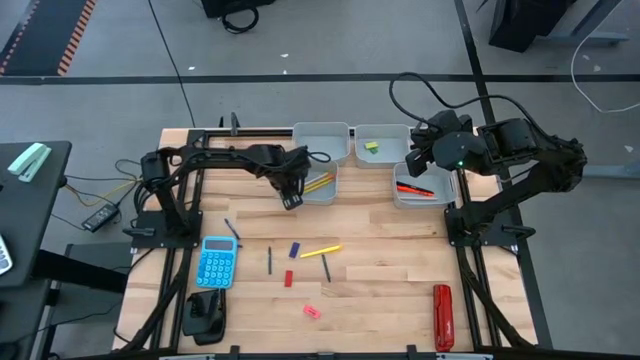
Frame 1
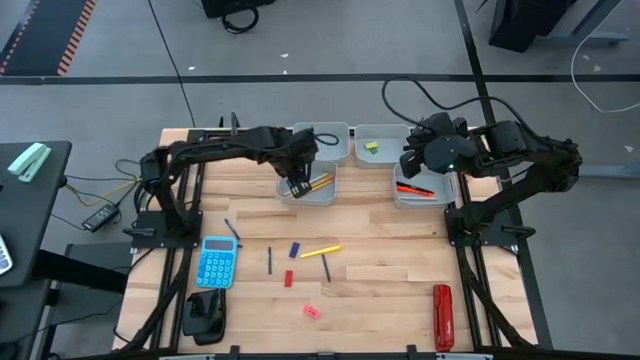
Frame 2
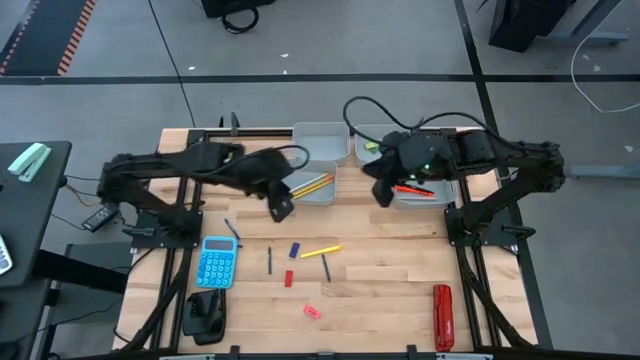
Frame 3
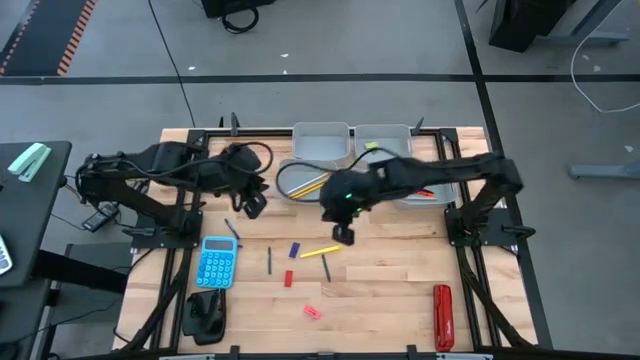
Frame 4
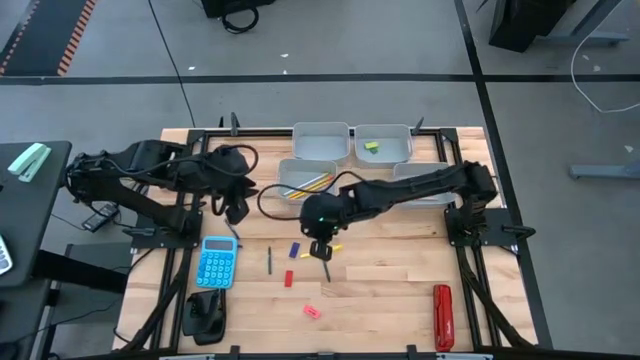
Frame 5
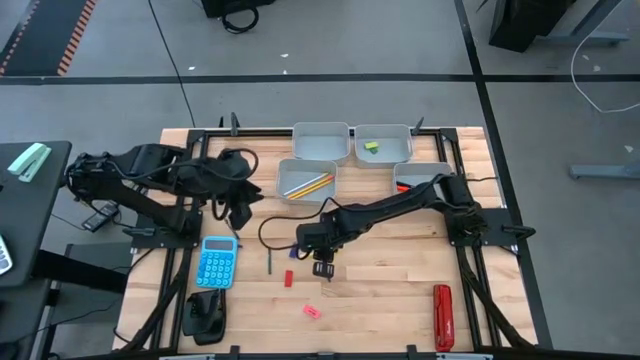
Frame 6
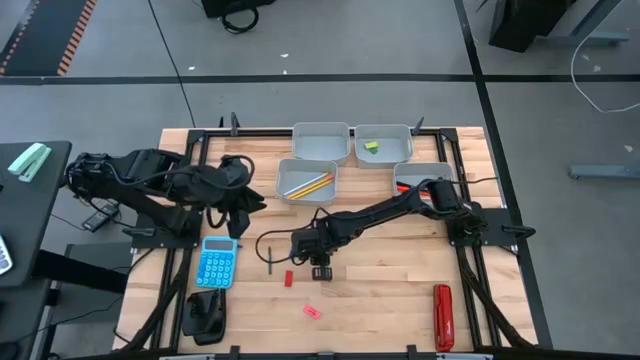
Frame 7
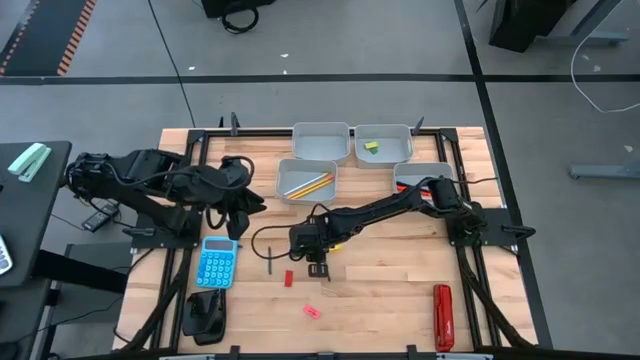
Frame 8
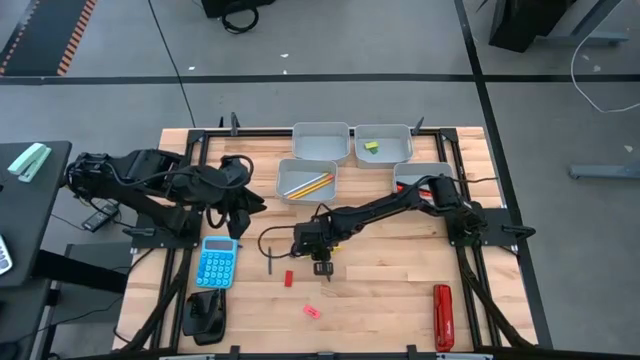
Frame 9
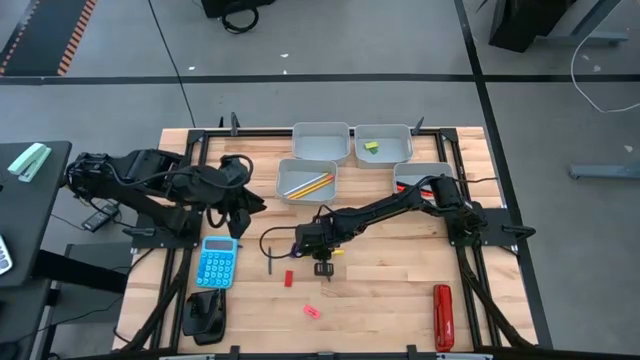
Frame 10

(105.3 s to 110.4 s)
Task: Sort crayons/erasers/pens/pencils in bins
Put the yellow pen into the bottom right gray bin

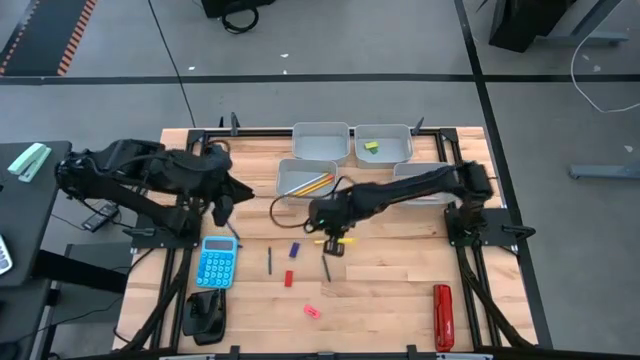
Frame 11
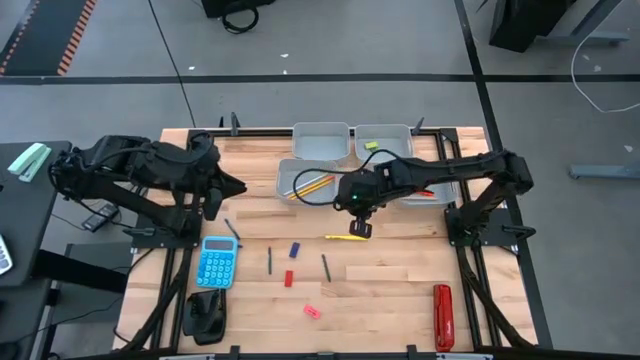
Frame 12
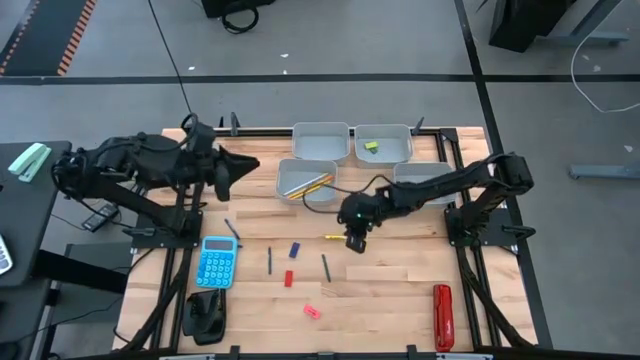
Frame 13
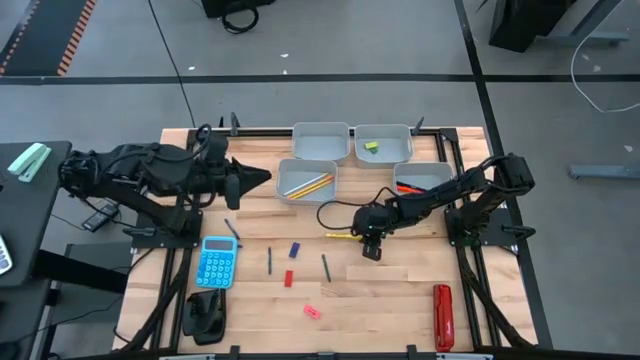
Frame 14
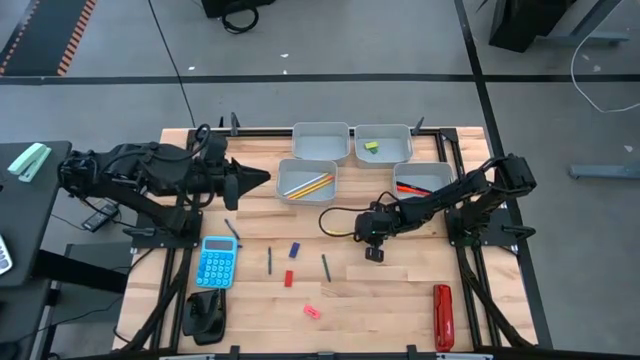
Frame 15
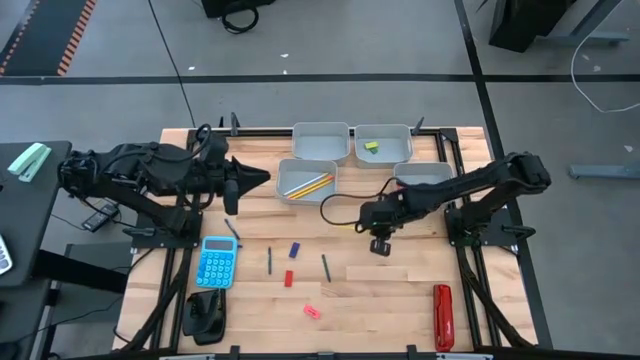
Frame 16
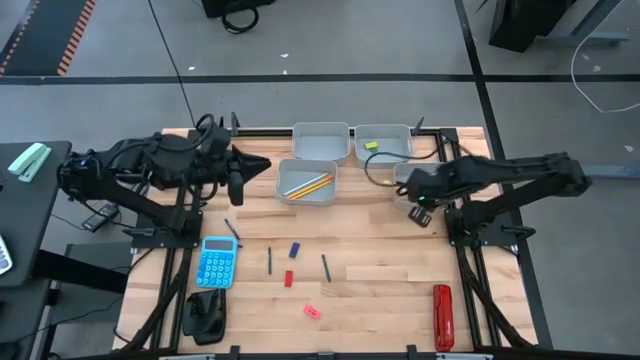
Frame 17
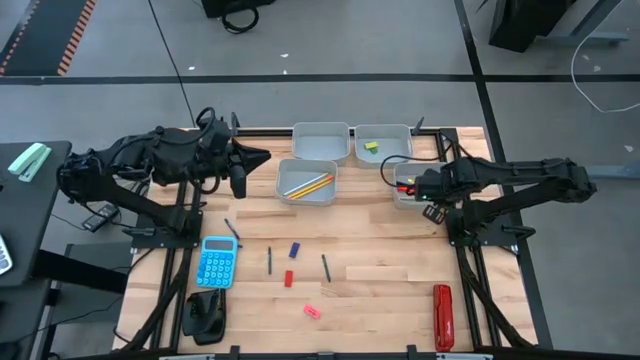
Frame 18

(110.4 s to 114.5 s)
Put the yellow pen into the bottom right gray bin

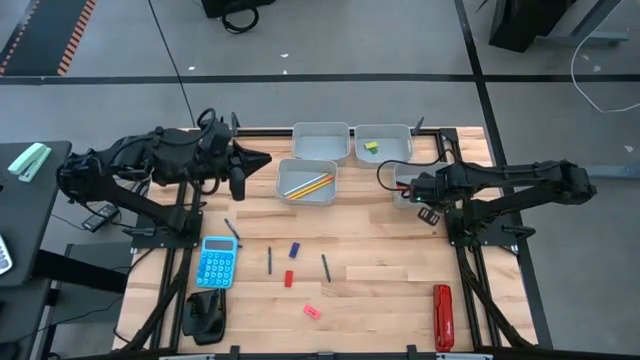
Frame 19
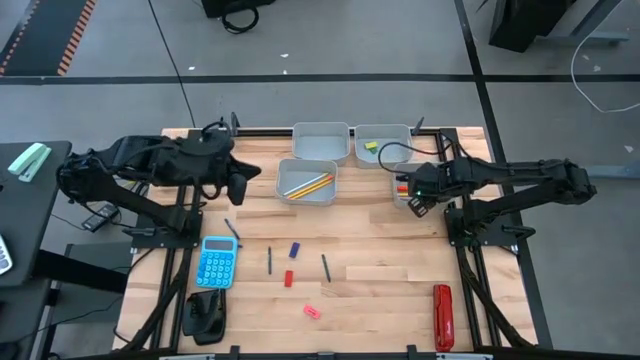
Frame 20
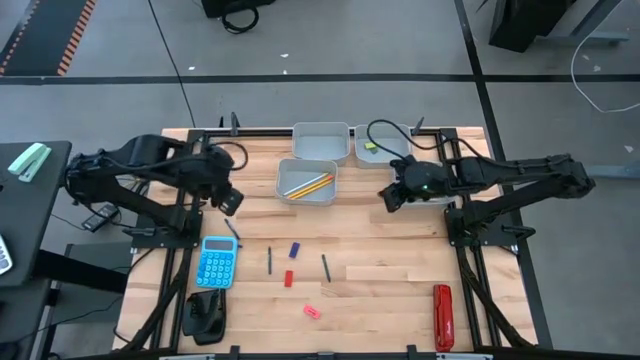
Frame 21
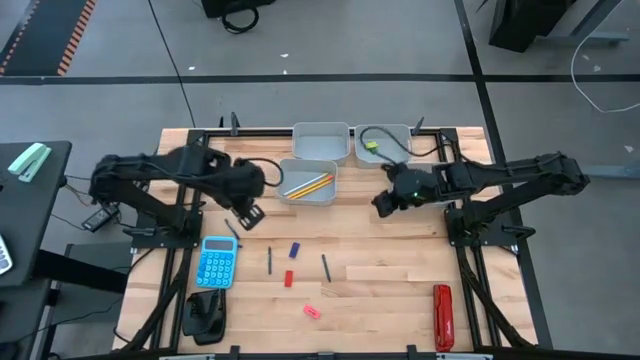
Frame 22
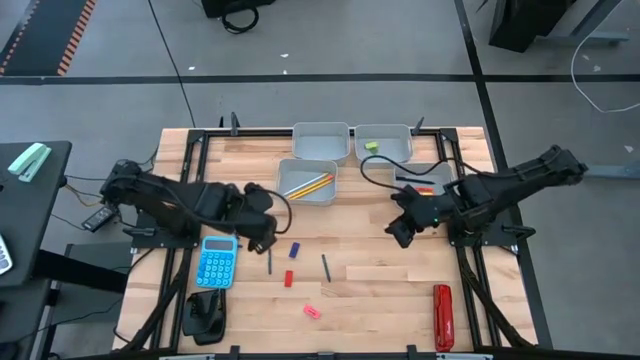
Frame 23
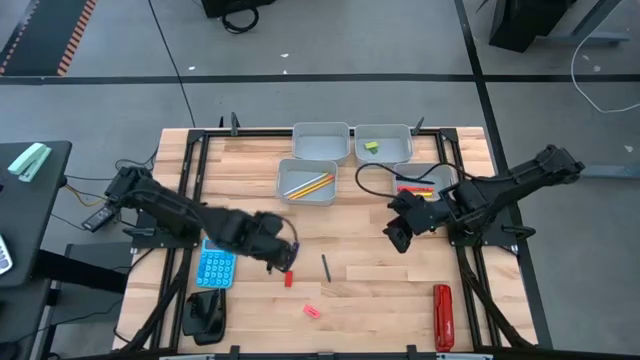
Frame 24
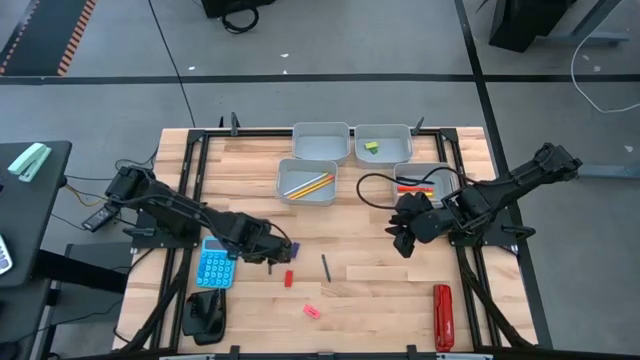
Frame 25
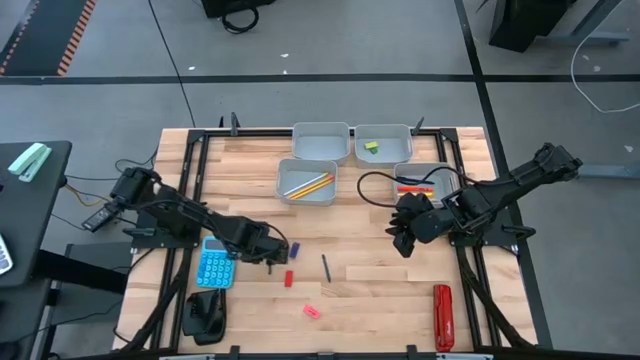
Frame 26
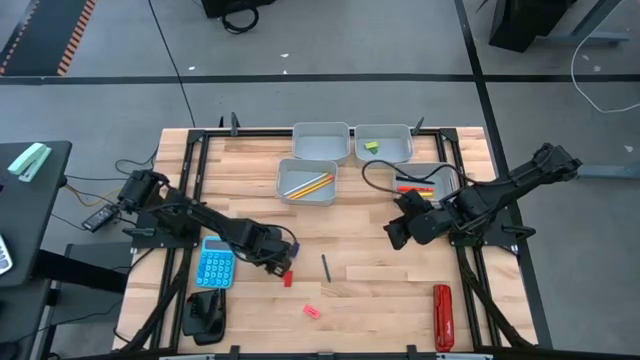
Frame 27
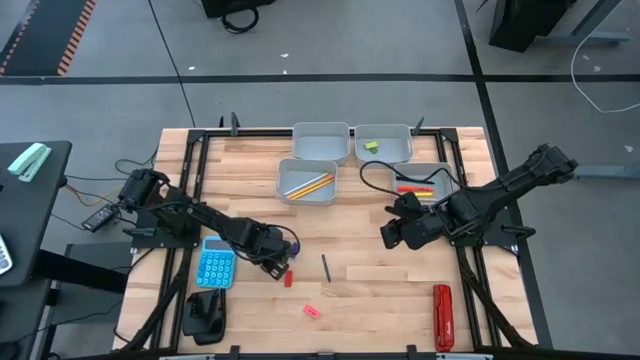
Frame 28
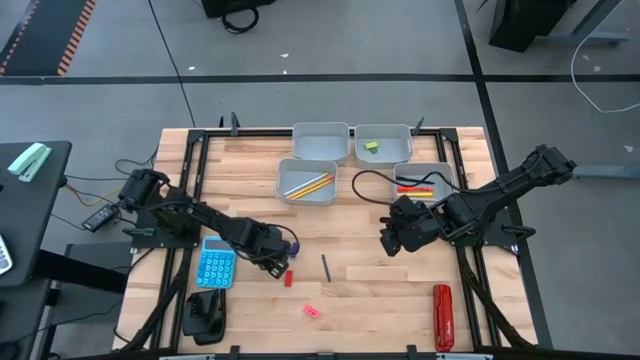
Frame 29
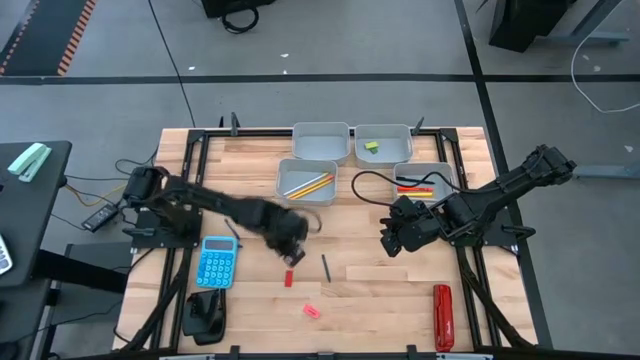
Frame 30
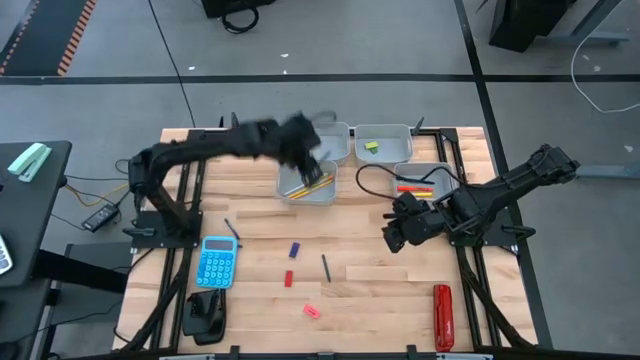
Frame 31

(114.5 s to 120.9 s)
Put the left green crayon into the top right gray bin

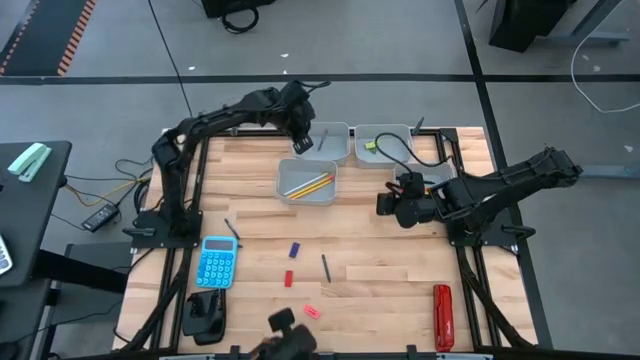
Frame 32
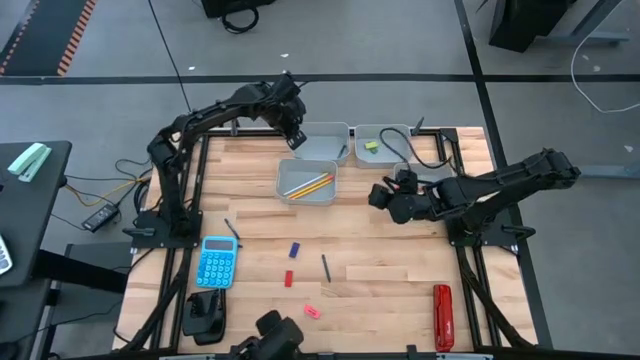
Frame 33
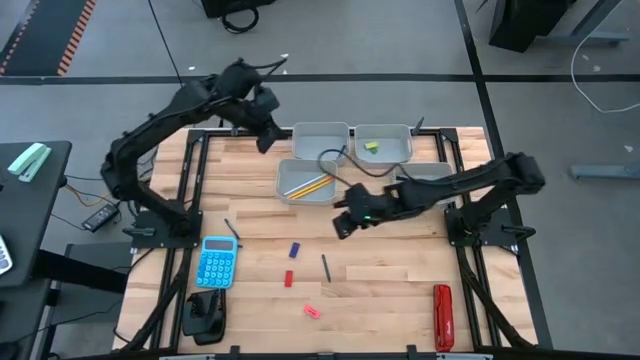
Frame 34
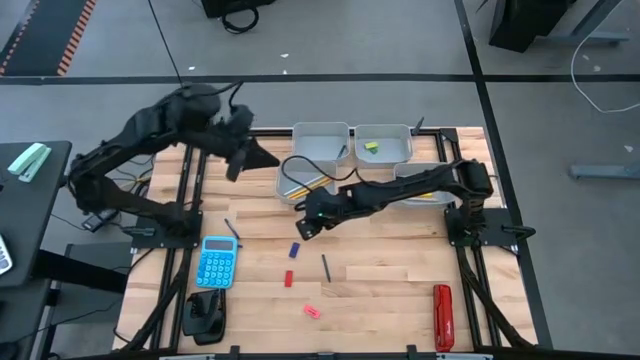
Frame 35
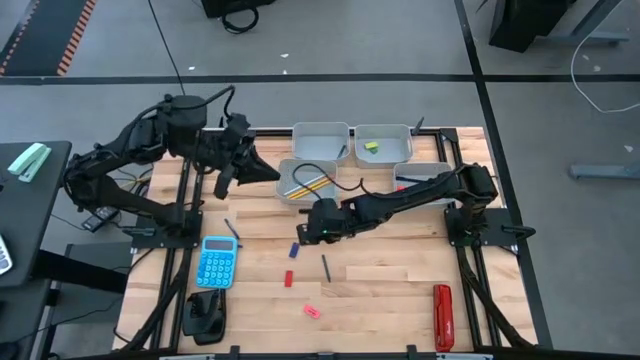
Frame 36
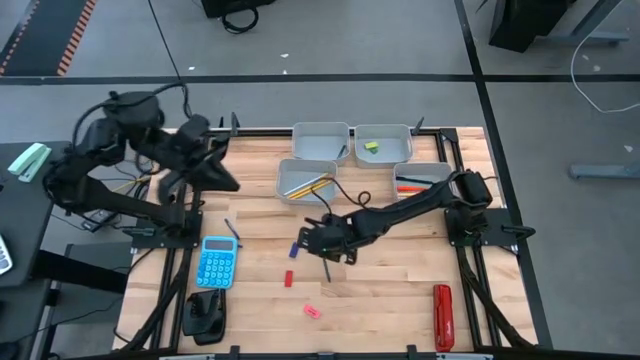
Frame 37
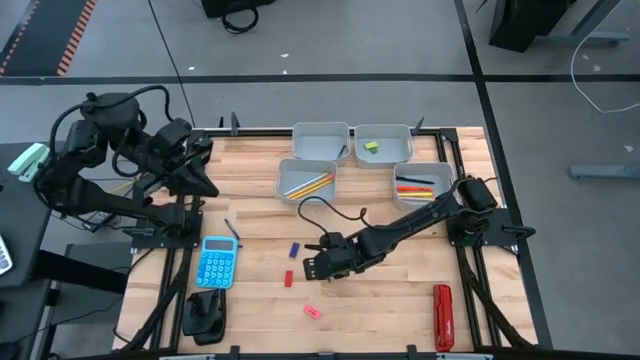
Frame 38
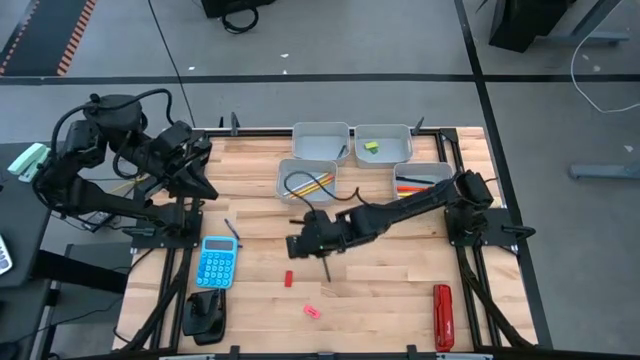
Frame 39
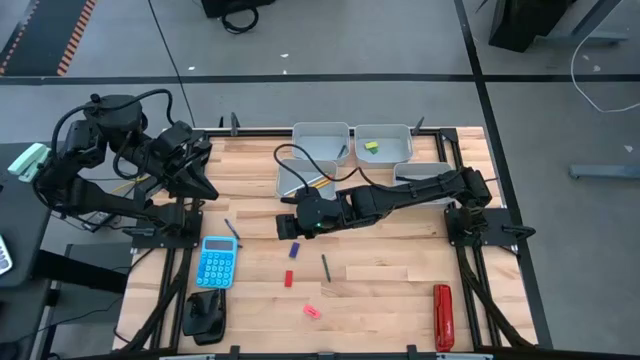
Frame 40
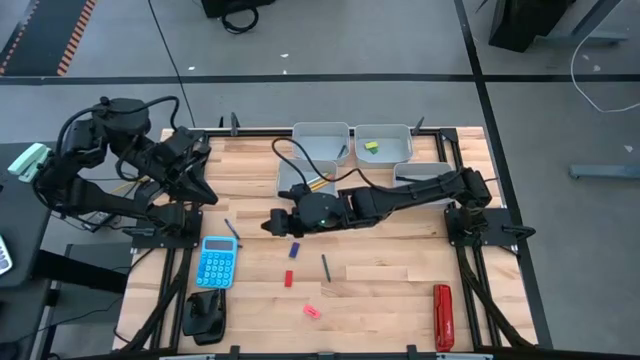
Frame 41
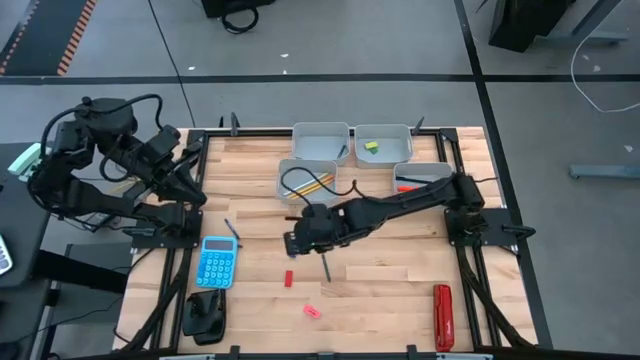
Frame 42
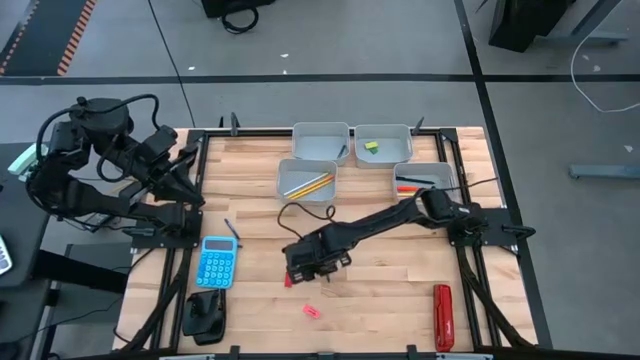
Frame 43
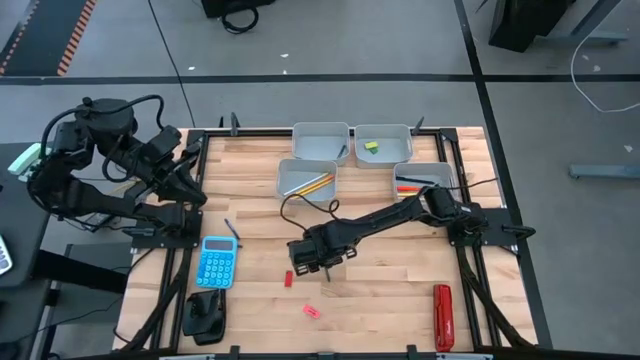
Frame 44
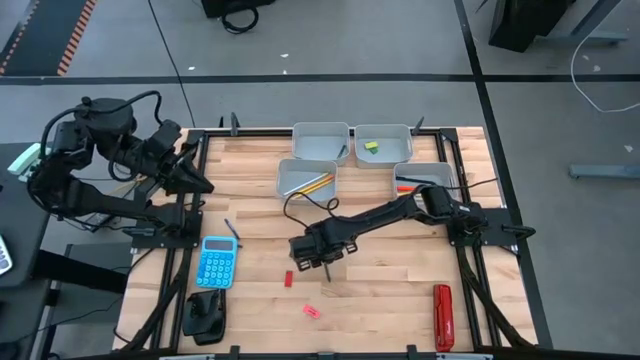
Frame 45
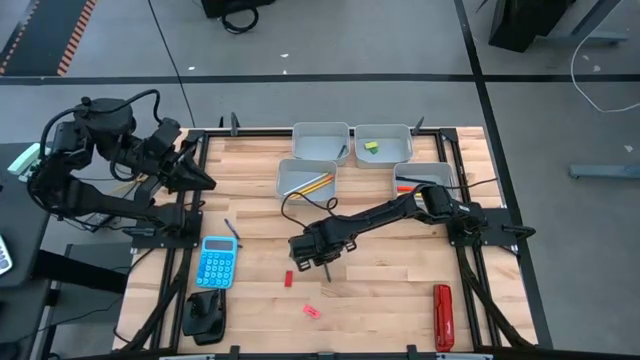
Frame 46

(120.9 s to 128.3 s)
Put the green crayon into the top right gray bin
